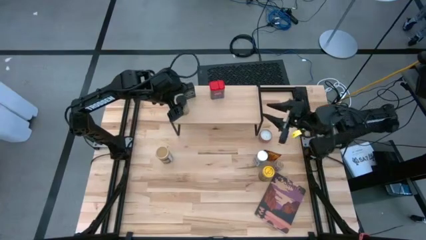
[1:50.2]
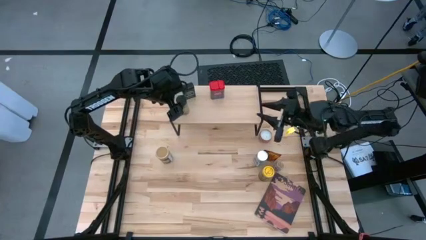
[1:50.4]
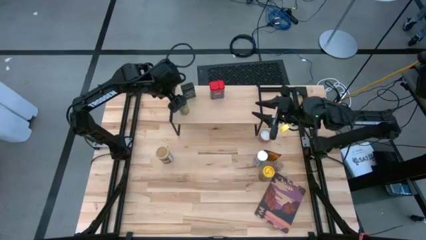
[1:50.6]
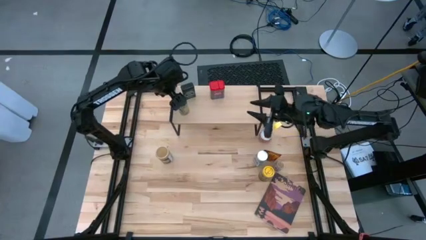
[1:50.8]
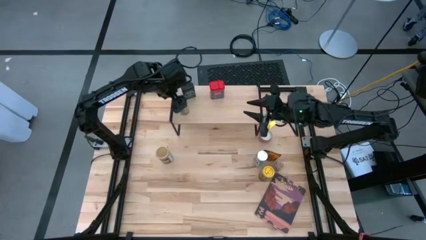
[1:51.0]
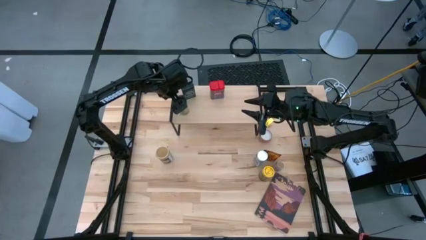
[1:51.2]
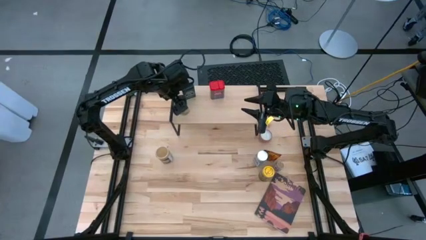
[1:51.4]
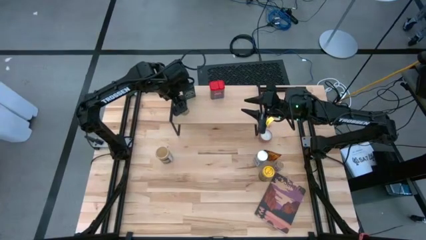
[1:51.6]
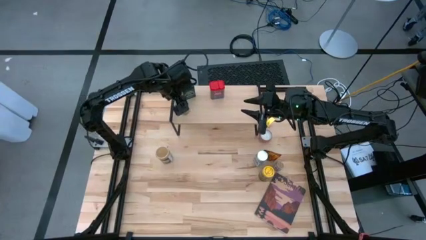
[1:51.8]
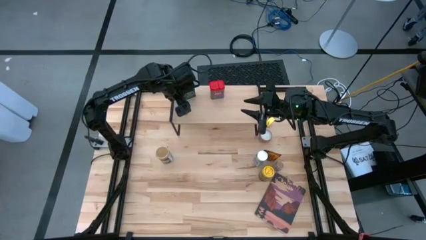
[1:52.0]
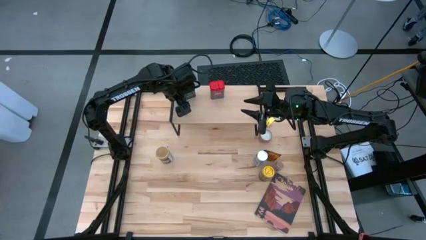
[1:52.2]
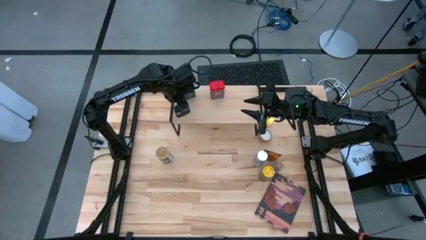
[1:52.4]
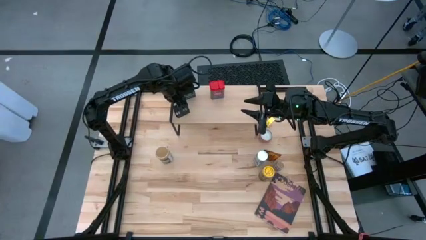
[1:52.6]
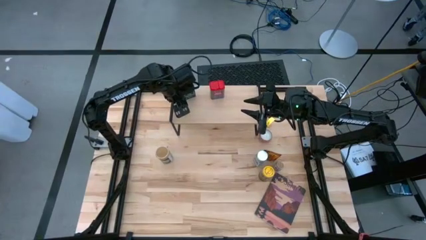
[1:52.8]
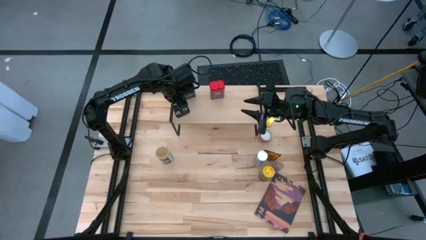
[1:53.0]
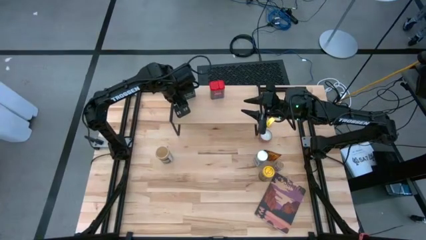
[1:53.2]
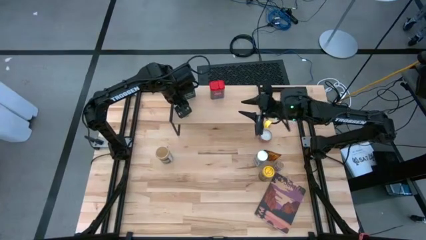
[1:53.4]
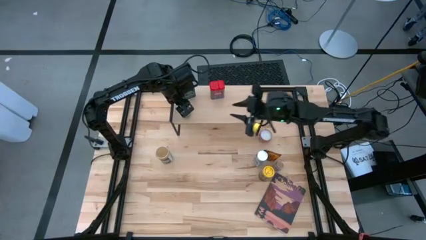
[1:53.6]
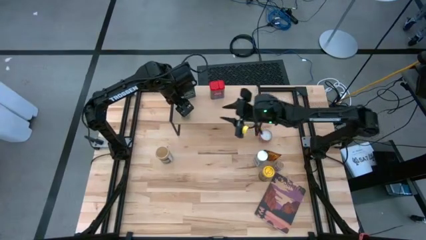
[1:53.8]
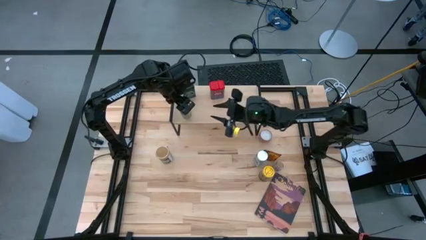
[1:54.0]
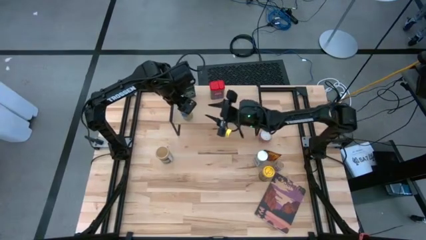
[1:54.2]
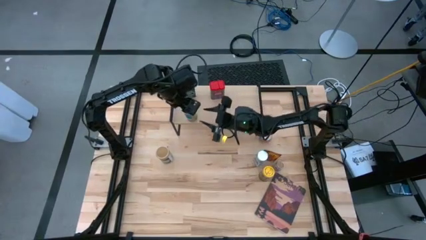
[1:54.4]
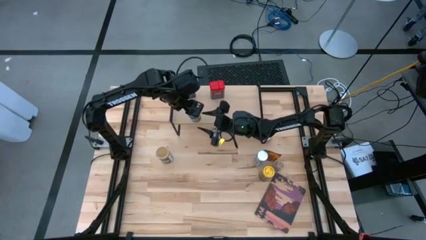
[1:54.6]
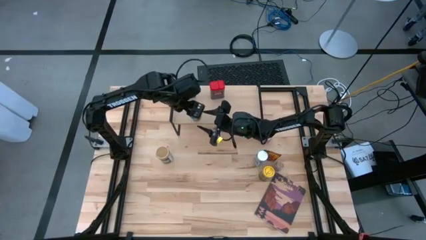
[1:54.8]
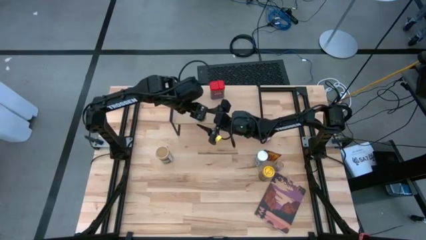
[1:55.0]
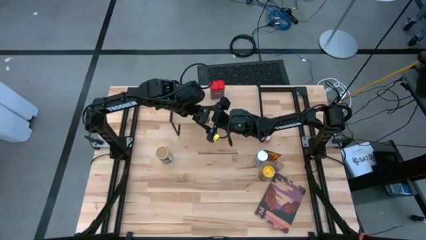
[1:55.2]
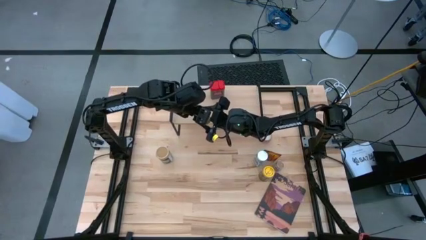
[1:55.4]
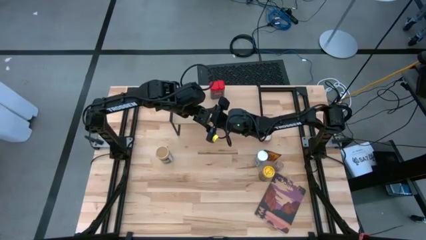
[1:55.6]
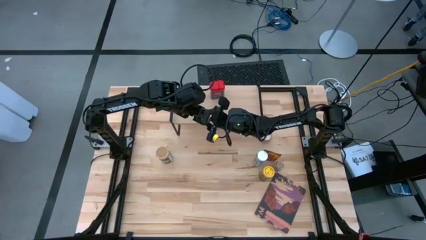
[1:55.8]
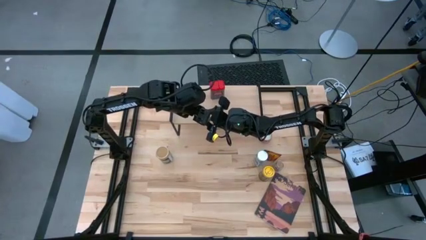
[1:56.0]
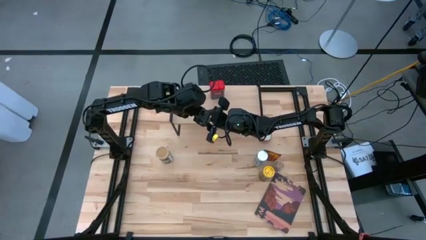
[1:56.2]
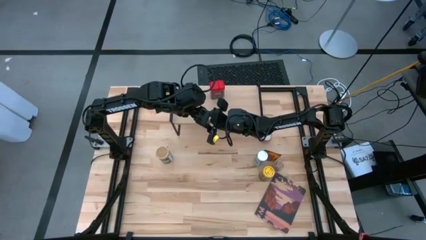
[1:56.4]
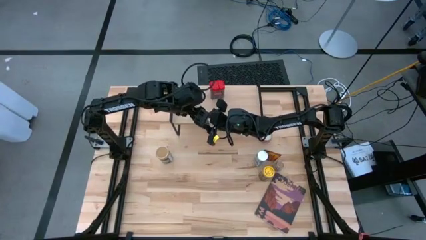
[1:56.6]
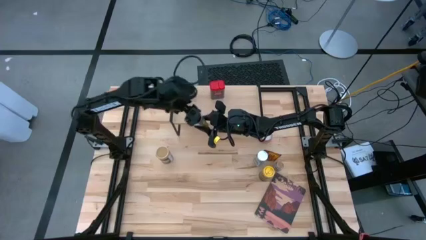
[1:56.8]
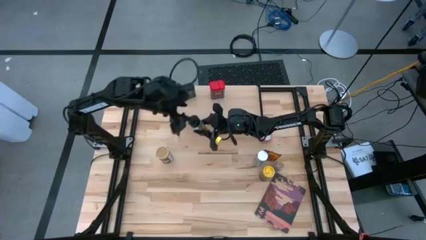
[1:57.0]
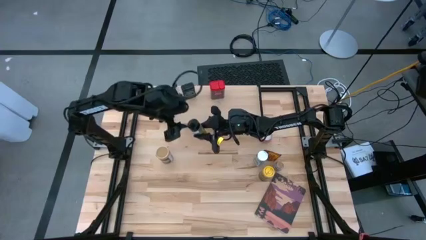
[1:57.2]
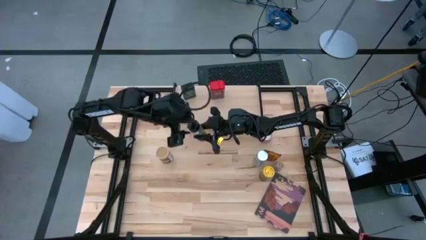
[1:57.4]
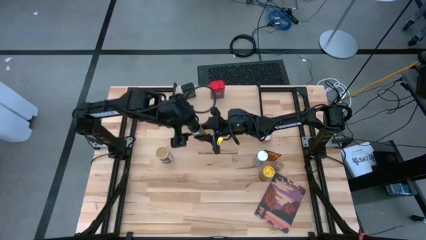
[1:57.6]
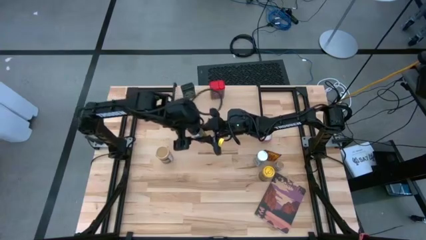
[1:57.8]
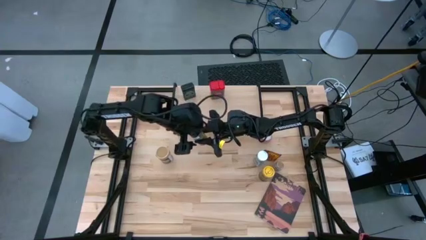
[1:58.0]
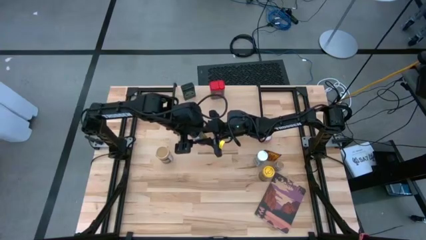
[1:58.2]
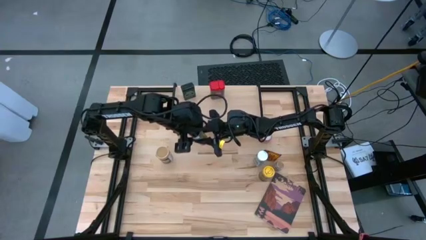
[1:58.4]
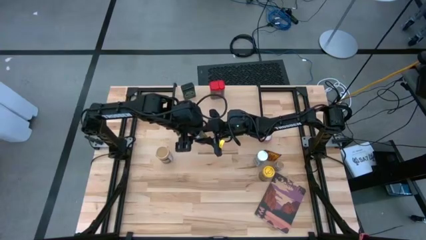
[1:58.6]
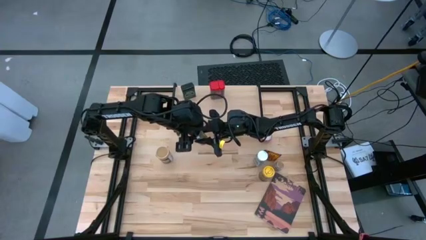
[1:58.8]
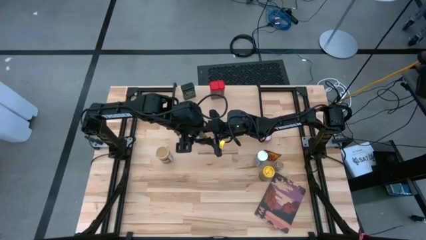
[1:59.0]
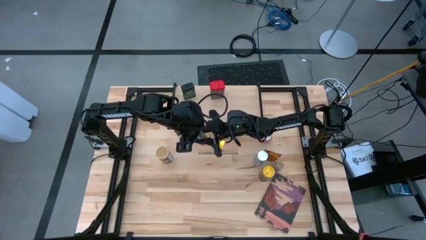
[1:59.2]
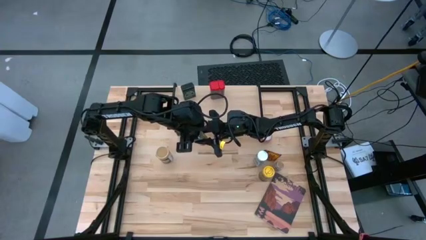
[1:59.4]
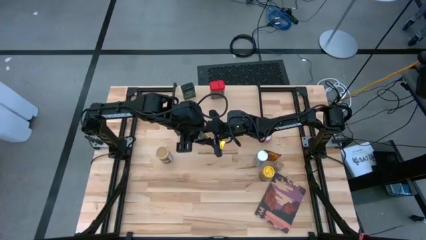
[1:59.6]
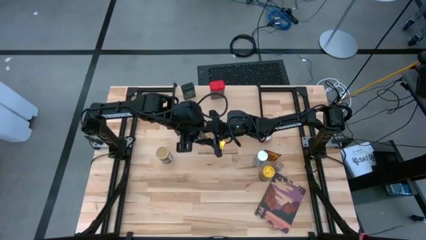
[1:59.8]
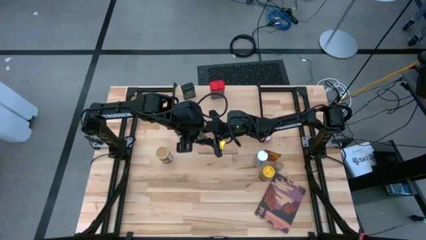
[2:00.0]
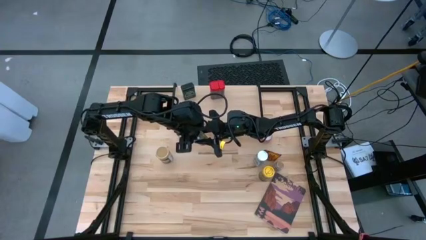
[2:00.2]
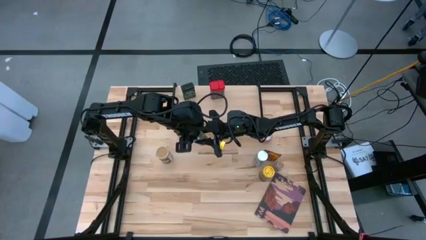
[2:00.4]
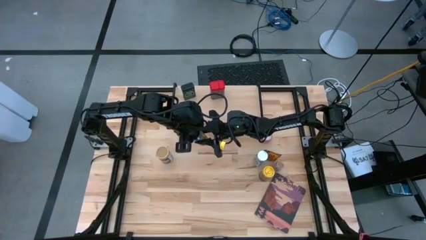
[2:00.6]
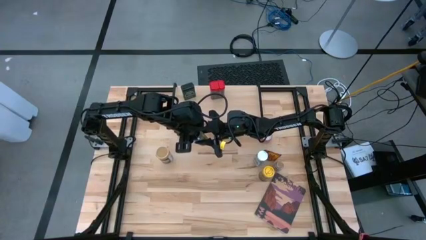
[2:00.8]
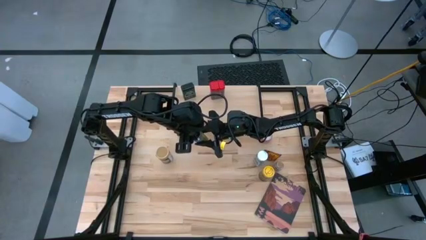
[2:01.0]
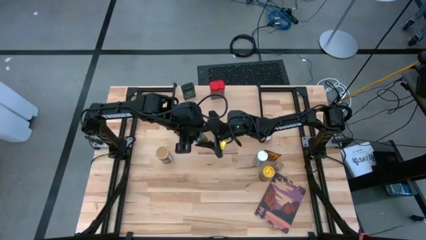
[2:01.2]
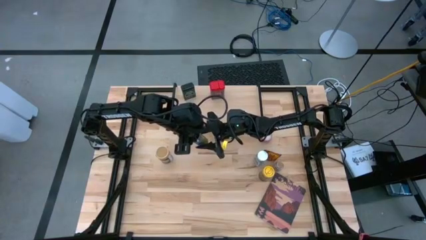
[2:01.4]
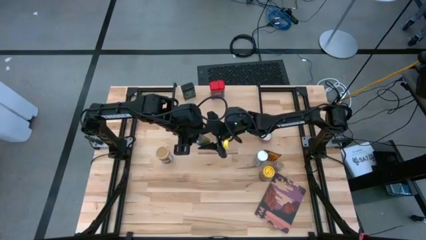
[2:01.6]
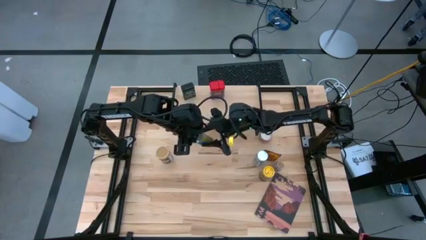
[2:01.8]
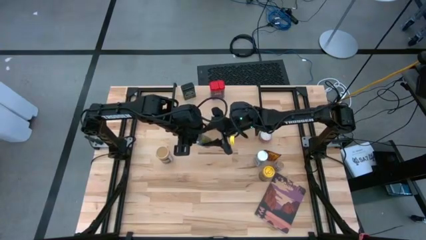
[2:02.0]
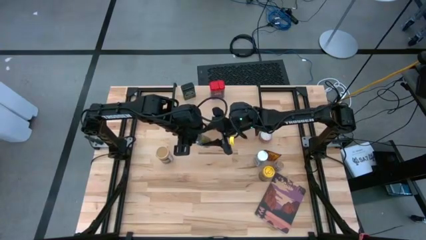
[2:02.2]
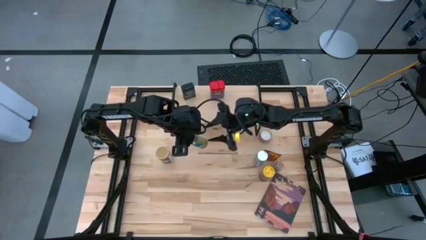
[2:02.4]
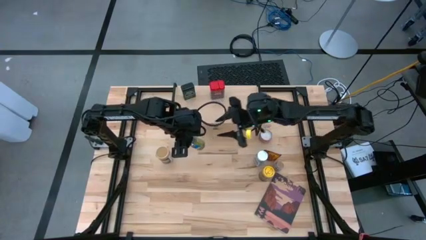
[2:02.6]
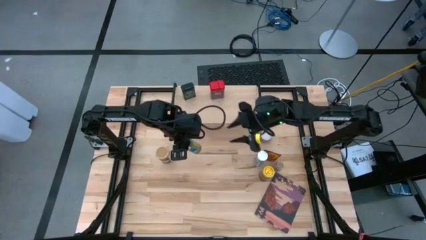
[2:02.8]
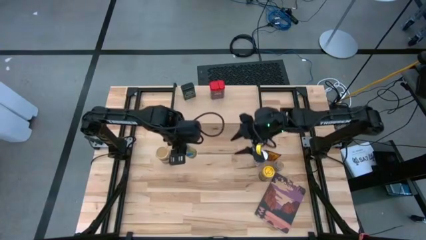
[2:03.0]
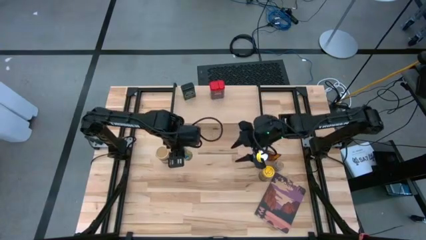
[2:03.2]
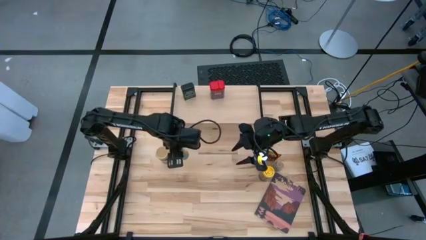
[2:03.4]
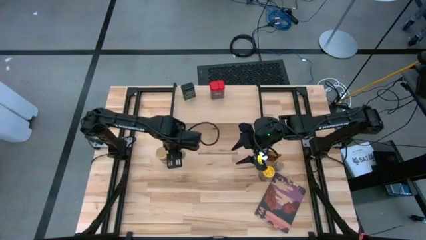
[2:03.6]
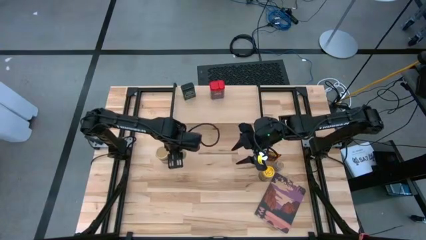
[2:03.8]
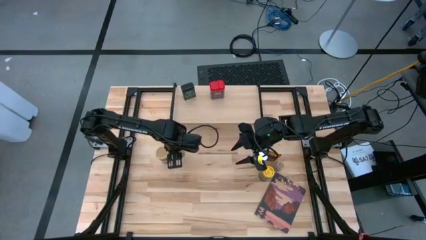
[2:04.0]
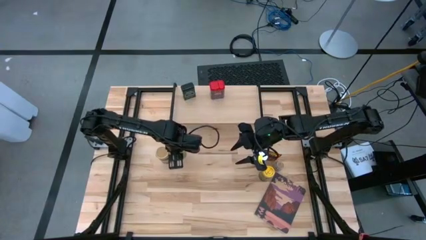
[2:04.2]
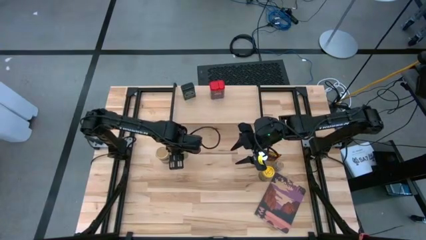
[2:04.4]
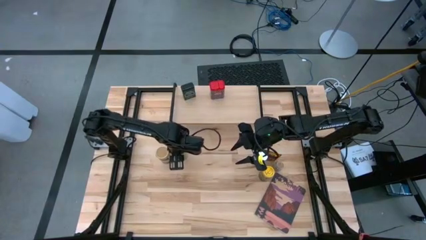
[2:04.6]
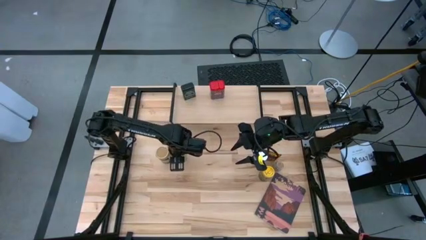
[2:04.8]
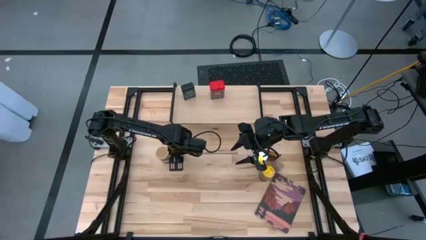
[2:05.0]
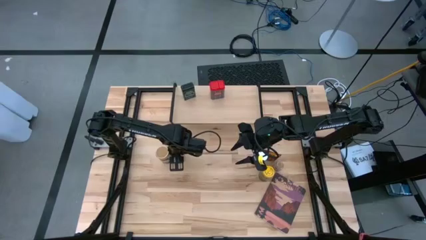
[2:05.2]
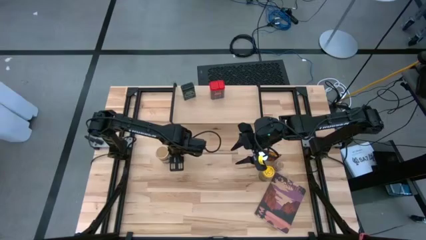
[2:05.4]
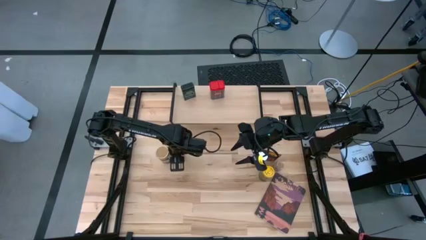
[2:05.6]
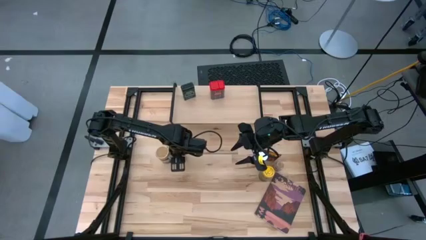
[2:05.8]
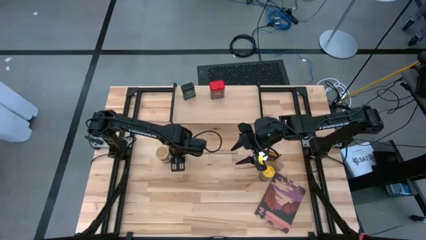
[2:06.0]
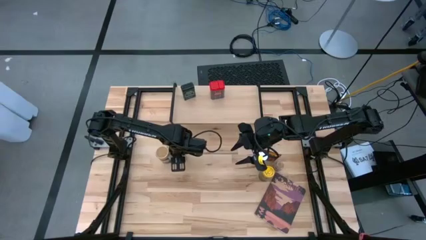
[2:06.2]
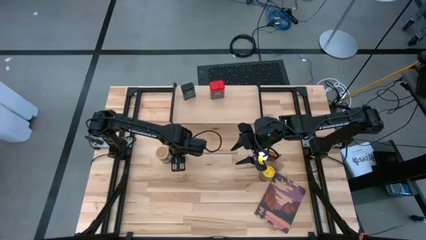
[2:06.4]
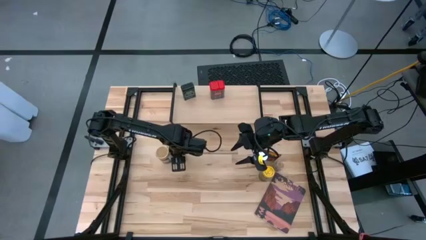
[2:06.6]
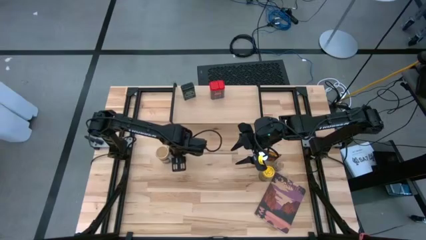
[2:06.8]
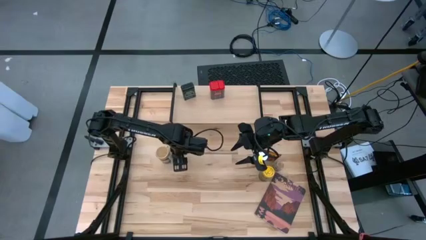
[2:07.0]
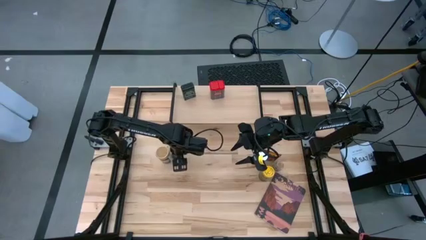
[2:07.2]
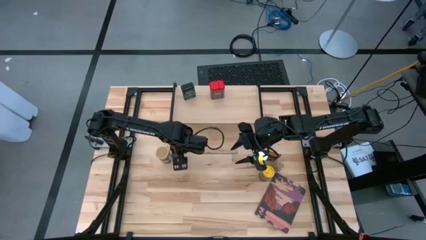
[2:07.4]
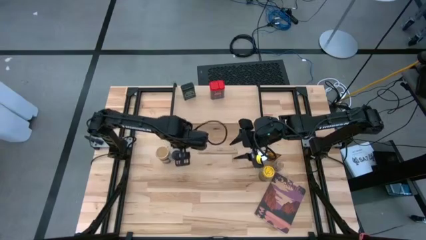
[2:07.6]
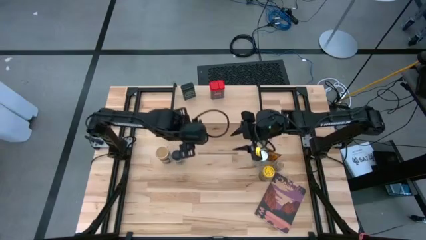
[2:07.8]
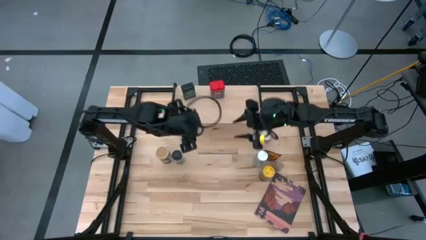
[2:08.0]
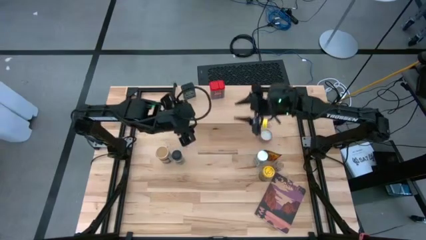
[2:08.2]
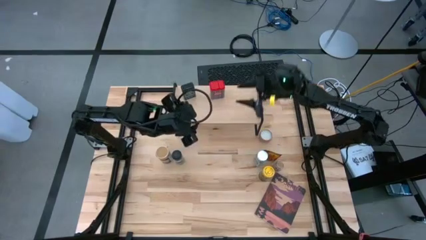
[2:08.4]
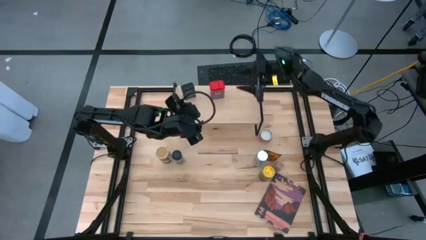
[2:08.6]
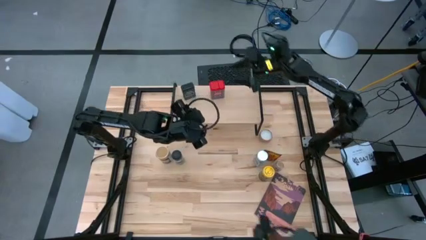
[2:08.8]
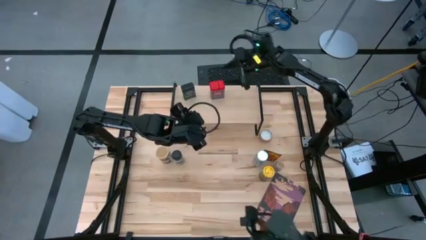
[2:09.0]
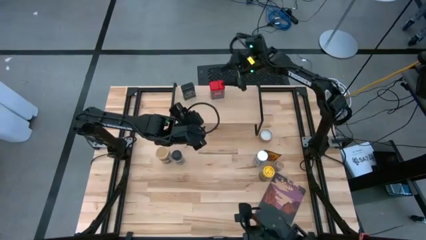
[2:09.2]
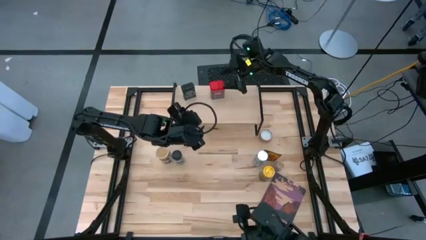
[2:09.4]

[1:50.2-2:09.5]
Task: Shelf spices
Put the dark yellow spice bottle on the table
